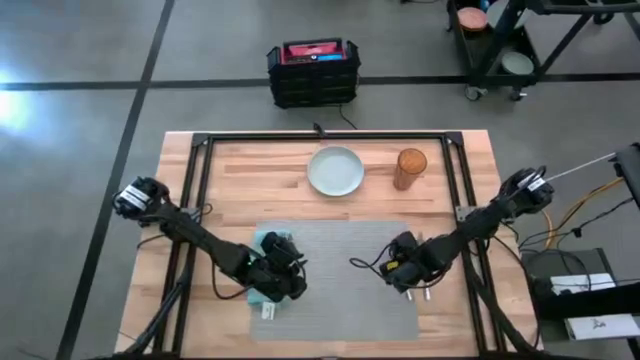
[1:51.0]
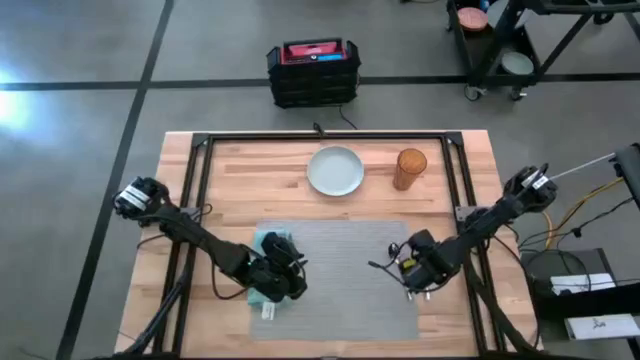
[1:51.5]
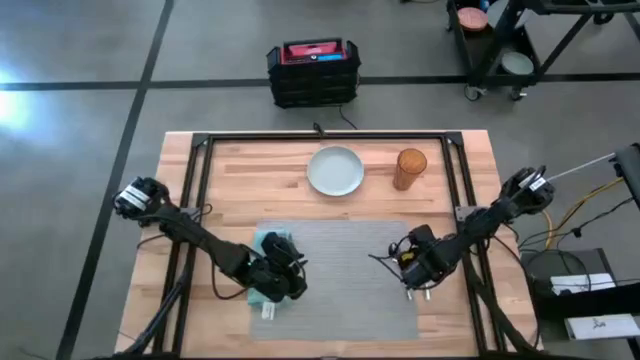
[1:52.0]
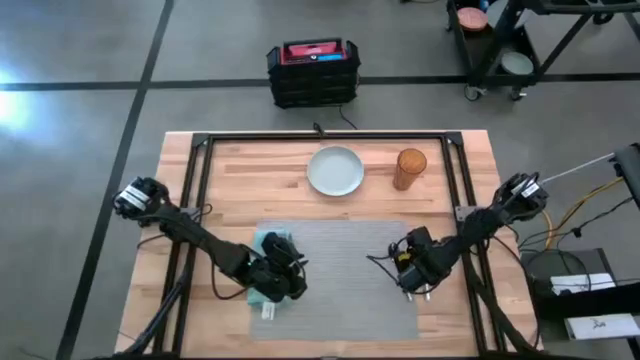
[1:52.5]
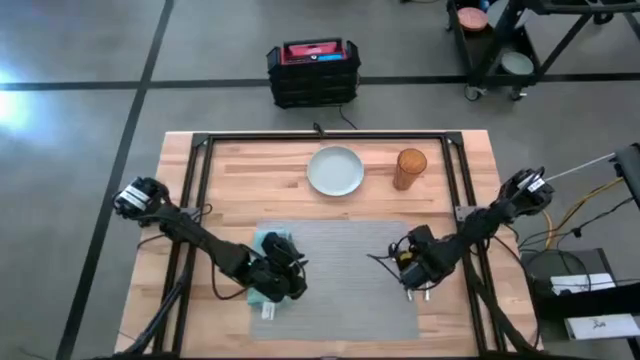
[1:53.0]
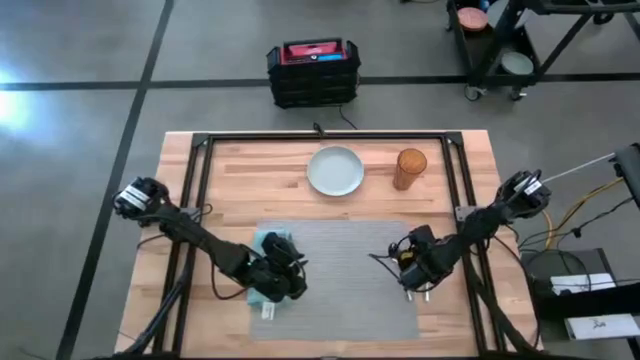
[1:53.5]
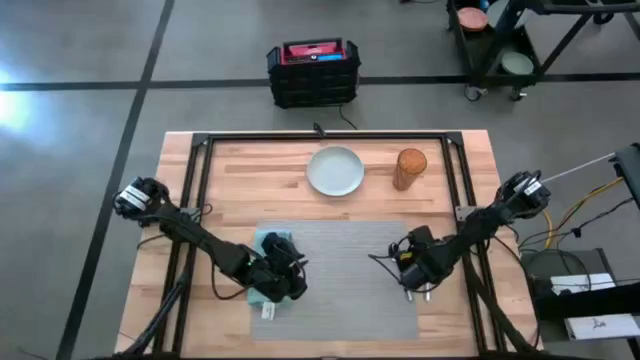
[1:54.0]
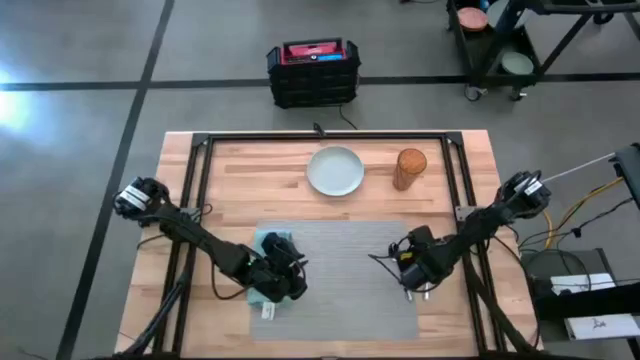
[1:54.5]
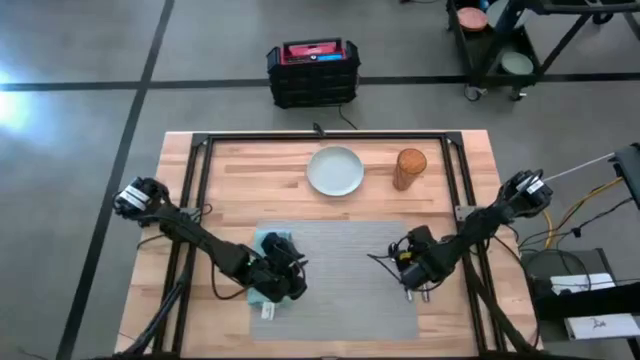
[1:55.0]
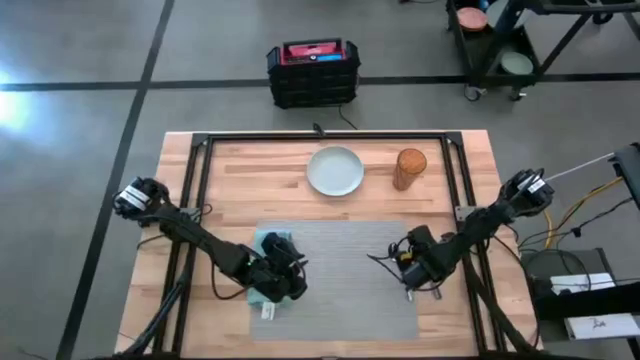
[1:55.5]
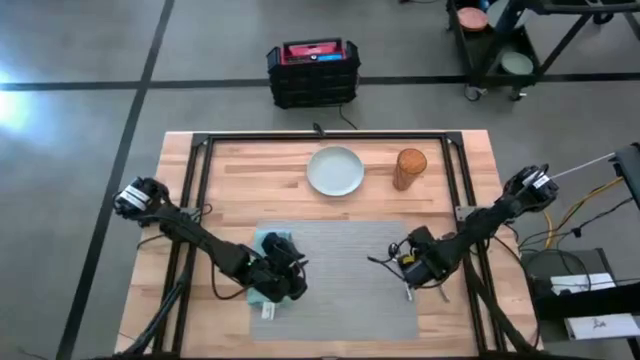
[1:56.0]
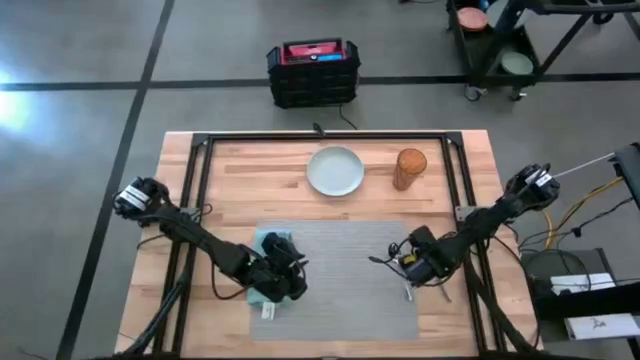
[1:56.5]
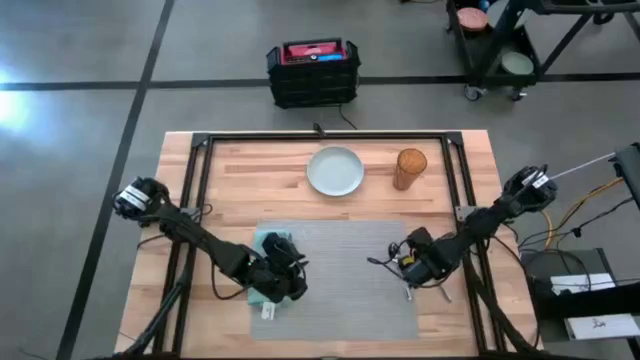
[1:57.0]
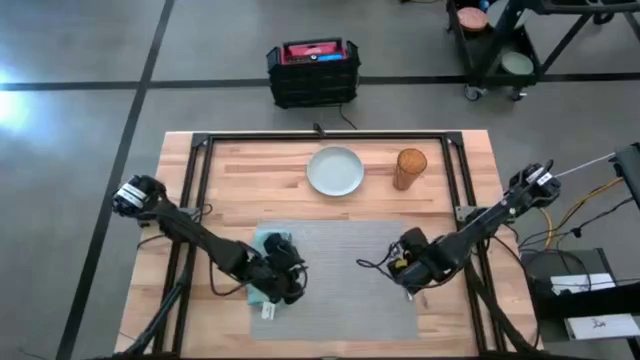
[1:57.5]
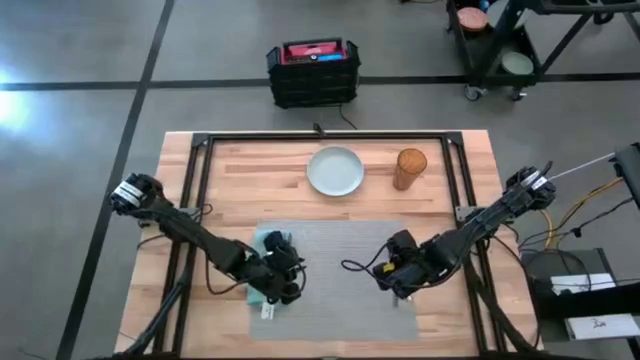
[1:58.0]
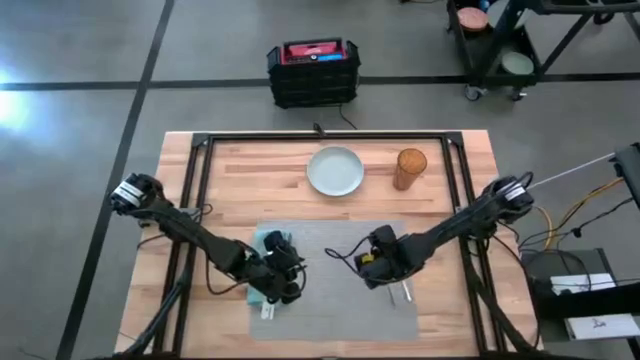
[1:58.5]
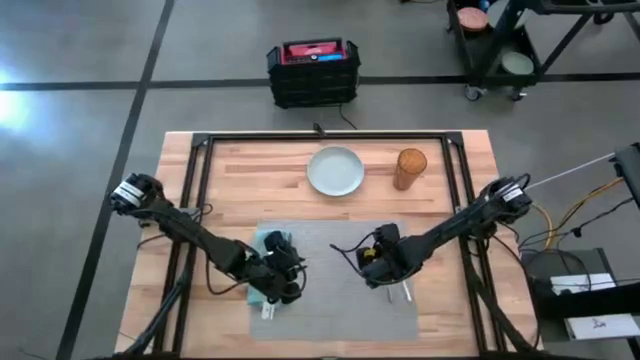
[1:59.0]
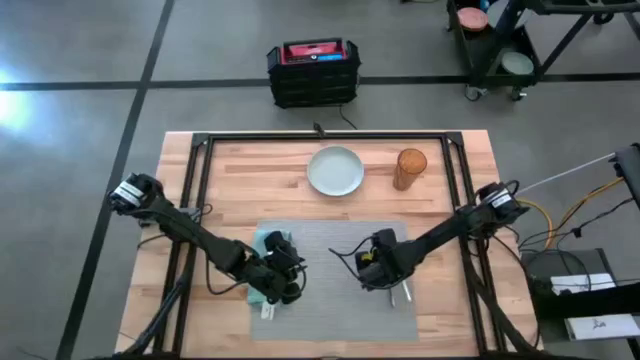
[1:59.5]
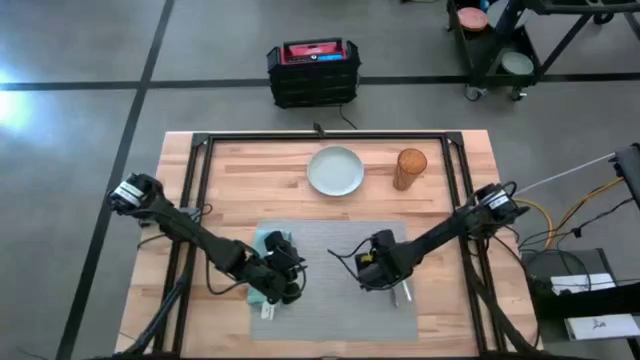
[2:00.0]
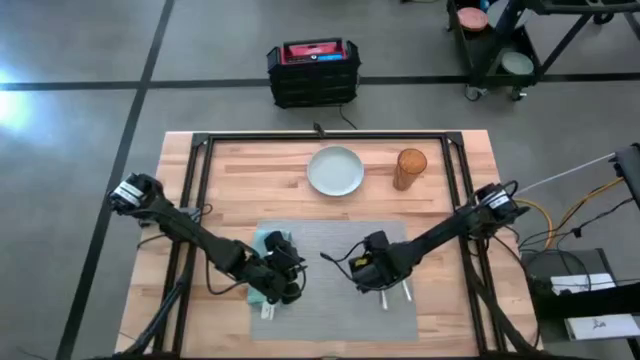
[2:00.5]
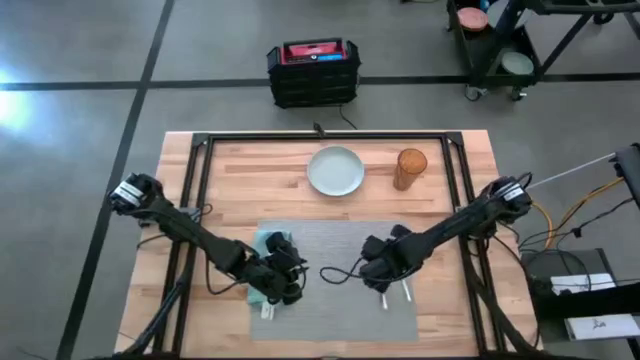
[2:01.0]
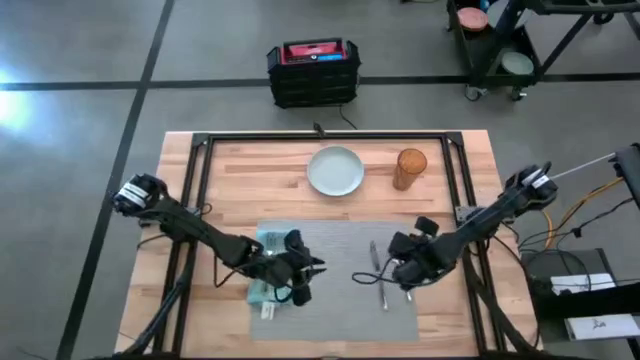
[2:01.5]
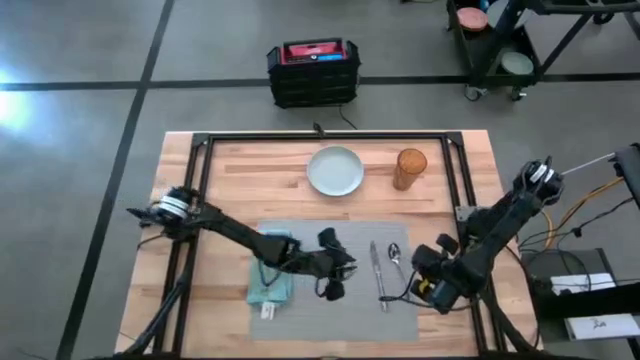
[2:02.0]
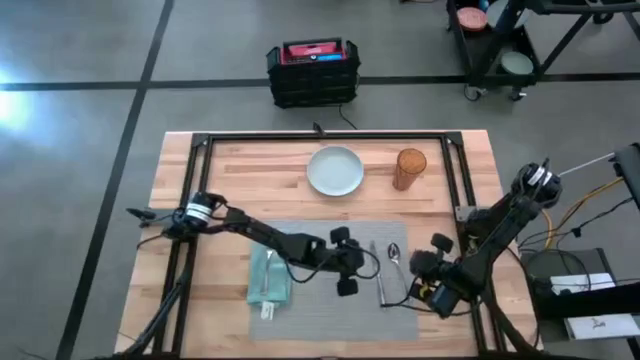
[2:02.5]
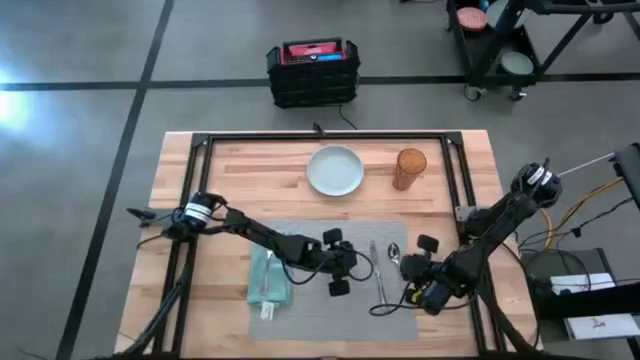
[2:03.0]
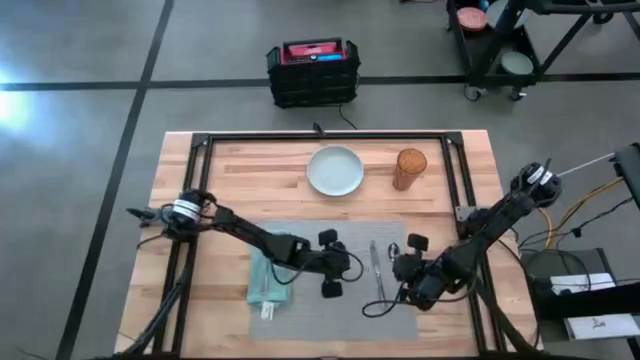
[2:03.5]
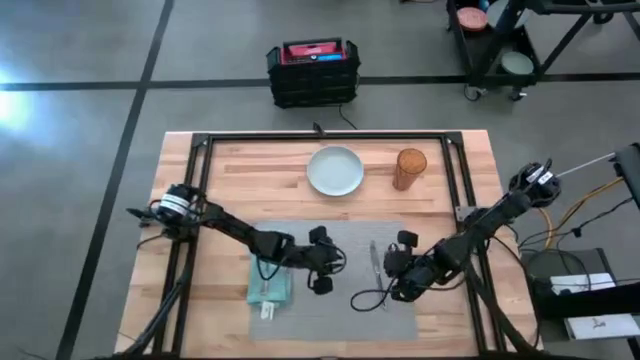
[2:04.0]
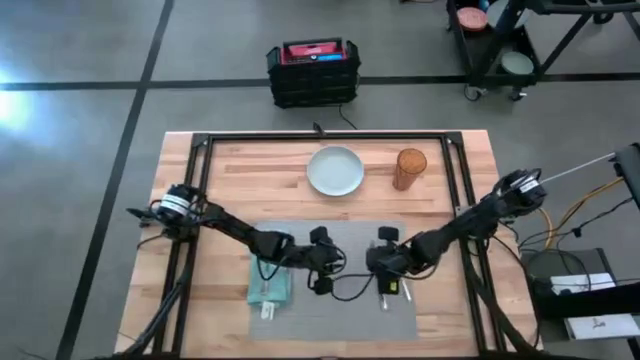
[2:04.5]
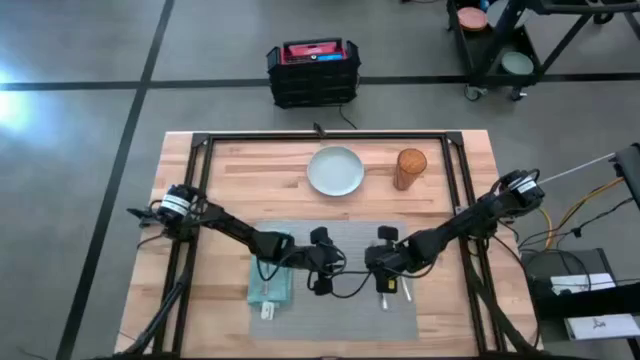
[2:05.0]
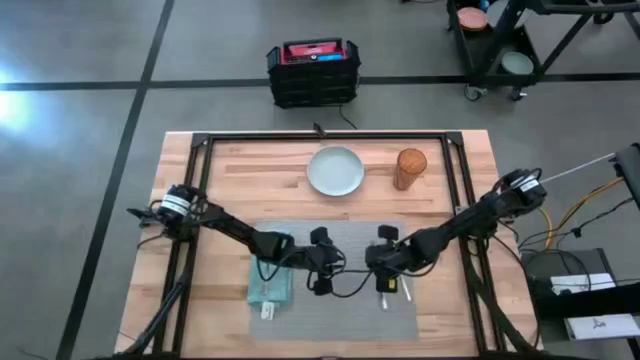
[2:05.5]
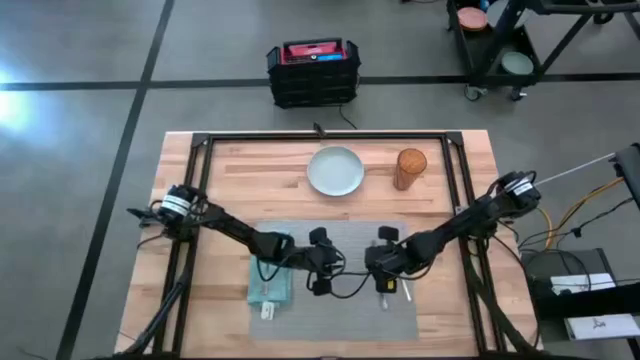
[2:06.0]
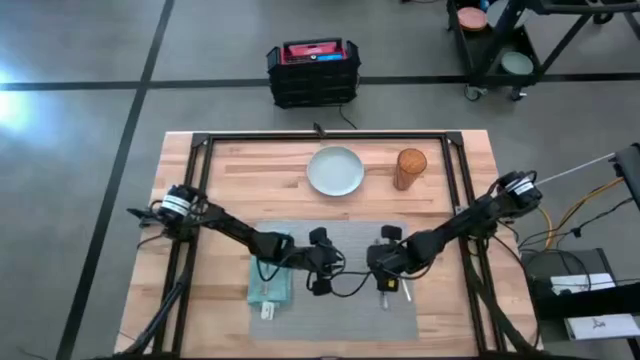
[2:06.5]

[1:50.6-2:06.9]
Task: Set table place
Put the table knife on the table mat to the left of the spoon

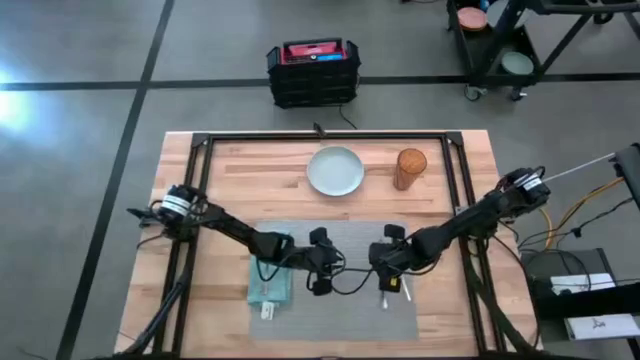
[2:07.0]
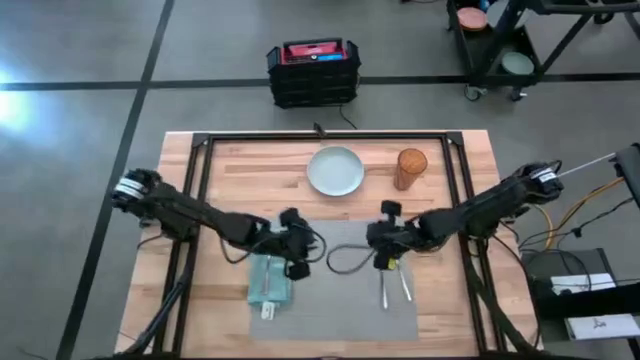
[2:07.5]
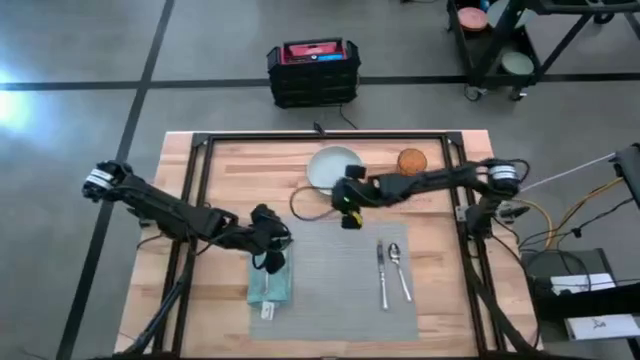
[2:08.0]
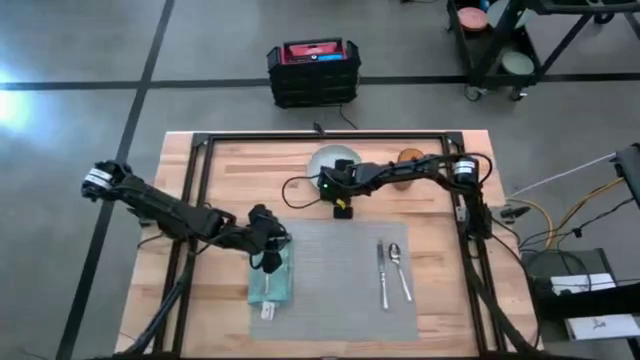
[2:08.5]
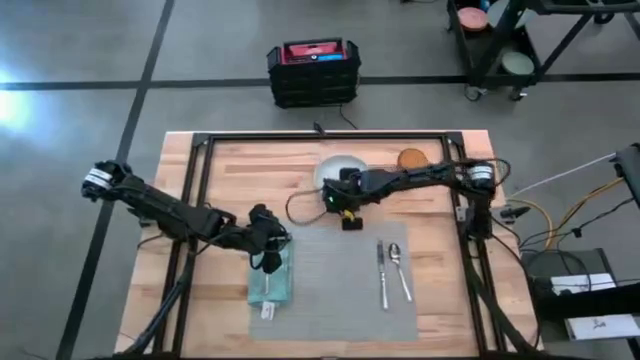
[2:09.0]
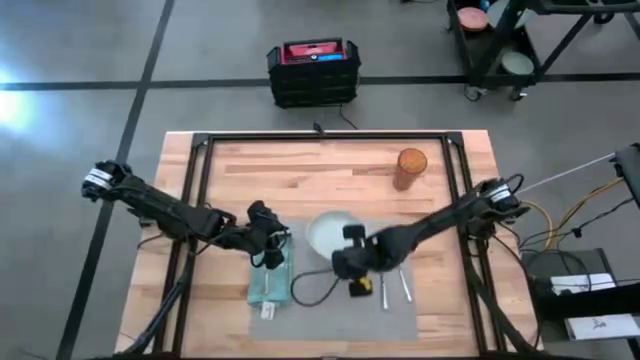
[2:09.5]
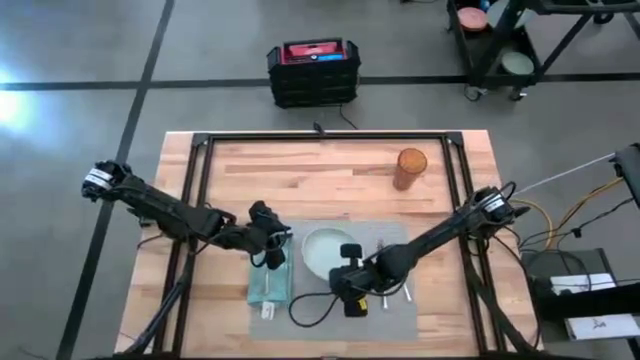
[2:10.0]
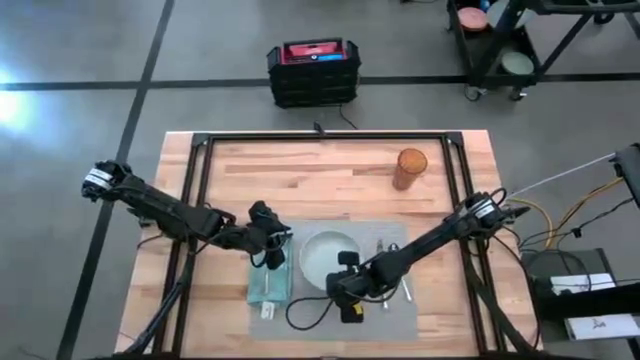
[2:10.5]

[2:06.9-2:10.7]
Put the plate on the table mat to the left of the table knife

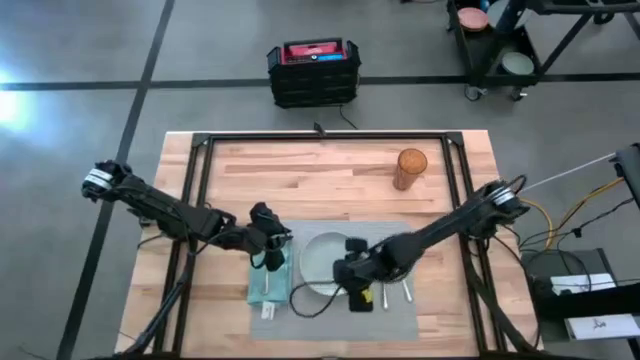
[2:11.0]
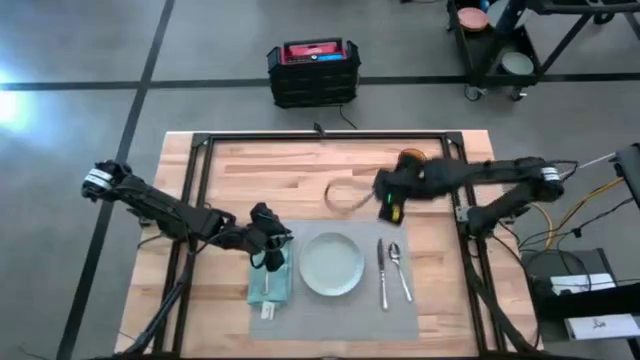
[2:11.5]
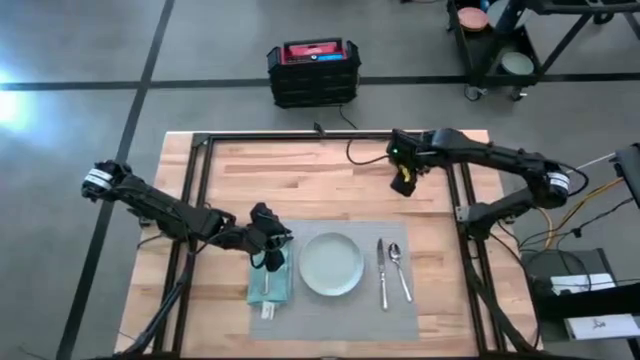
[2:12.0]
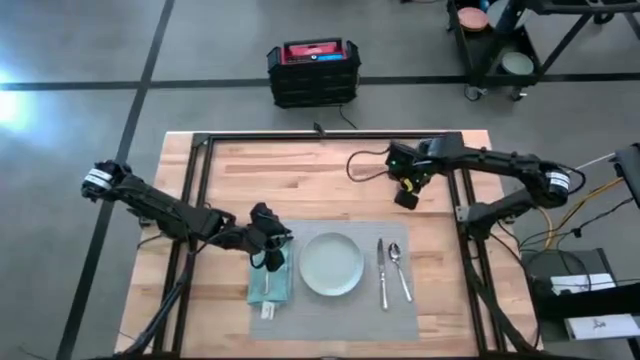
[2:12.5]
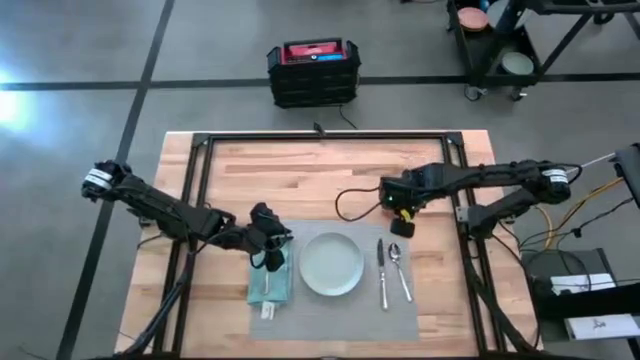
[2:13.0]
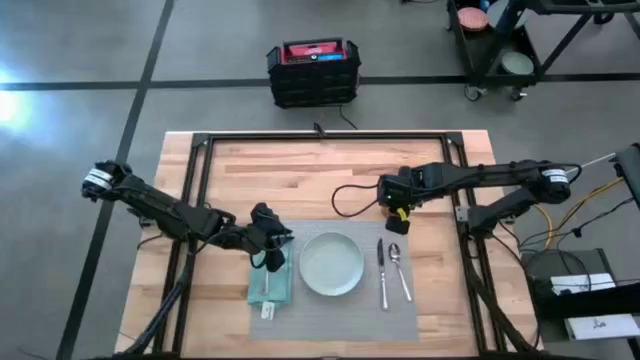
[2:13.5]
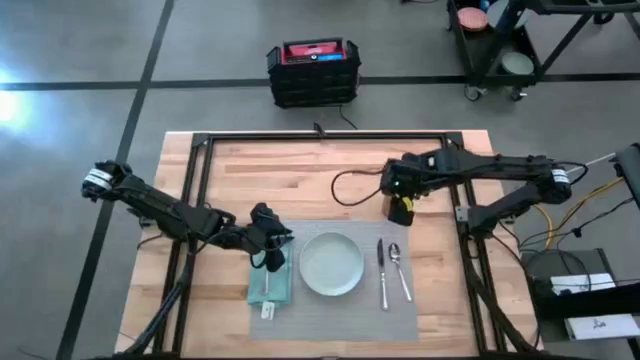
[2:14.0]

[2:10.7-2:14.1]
Move the orange cup to the top right of the table mat
